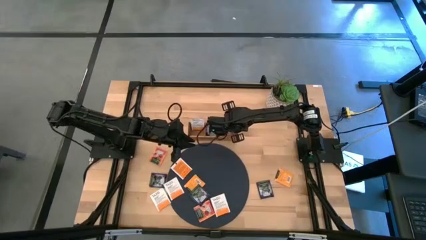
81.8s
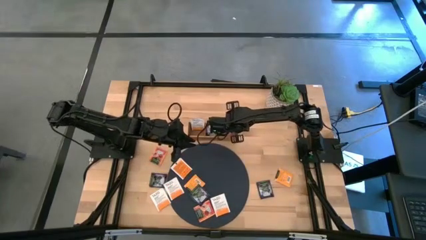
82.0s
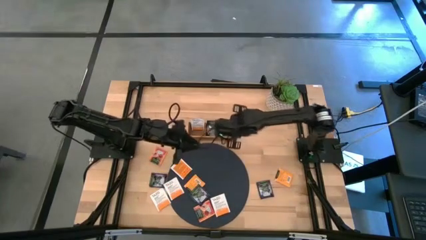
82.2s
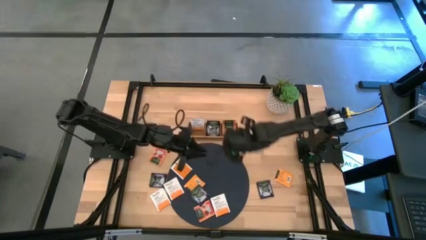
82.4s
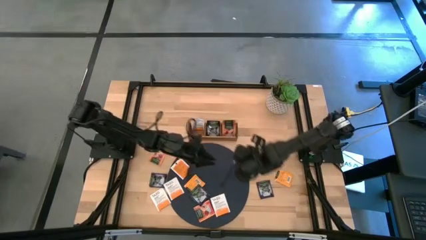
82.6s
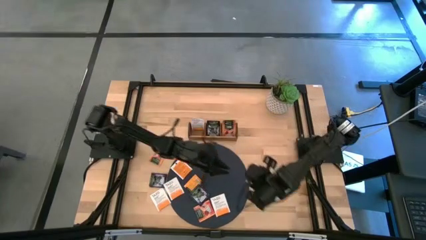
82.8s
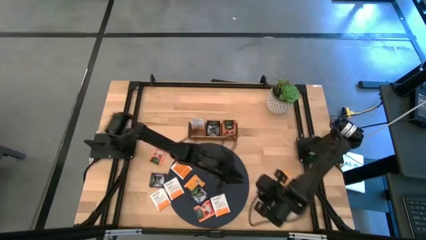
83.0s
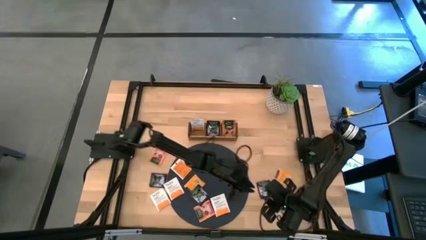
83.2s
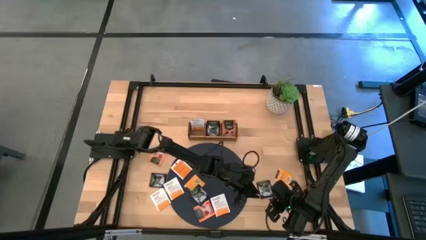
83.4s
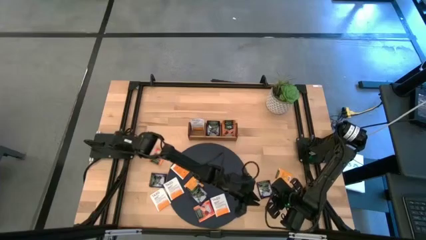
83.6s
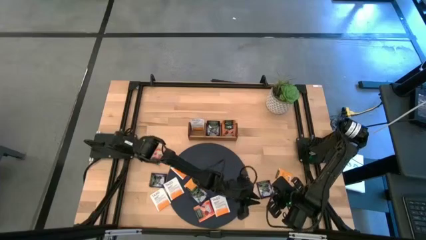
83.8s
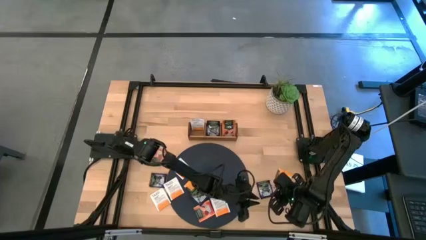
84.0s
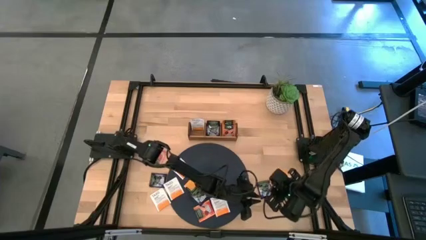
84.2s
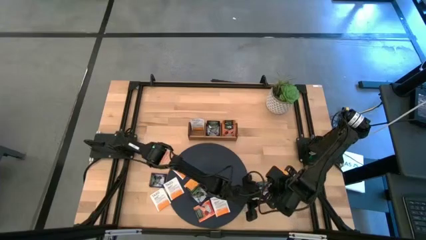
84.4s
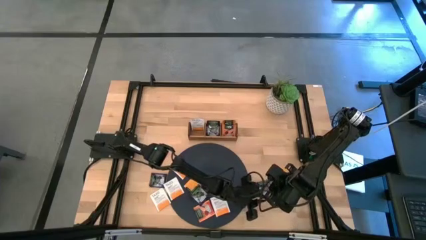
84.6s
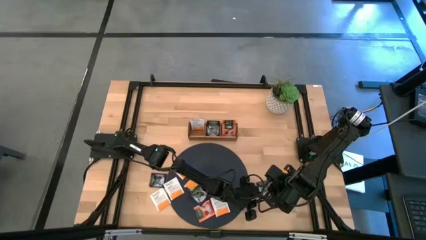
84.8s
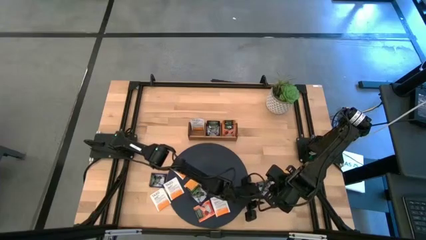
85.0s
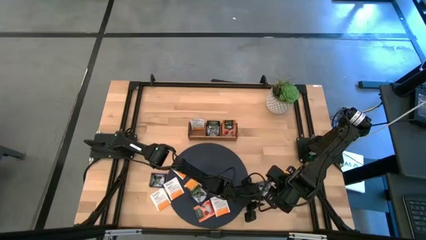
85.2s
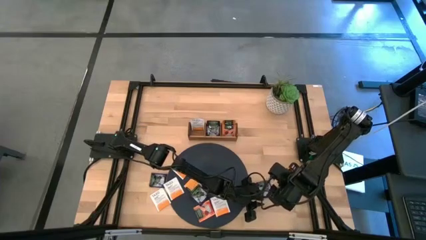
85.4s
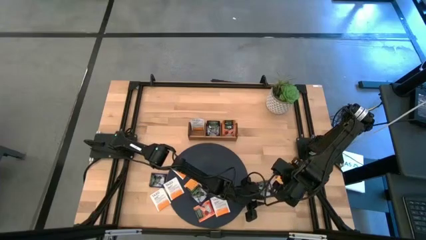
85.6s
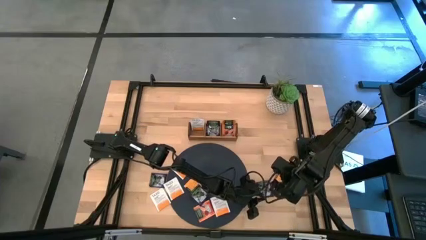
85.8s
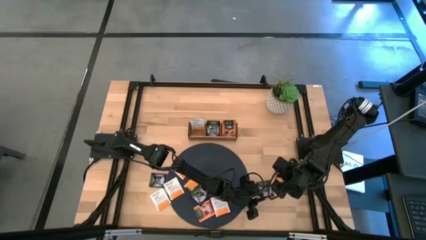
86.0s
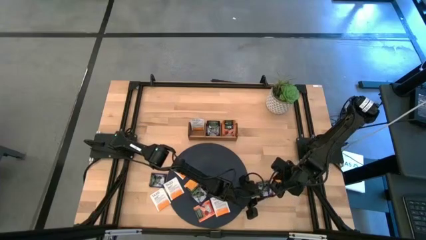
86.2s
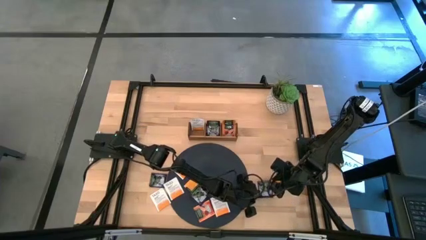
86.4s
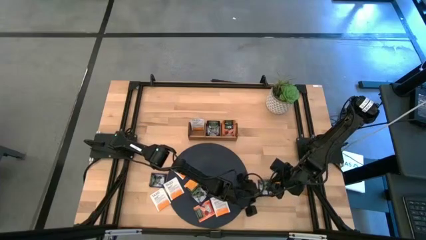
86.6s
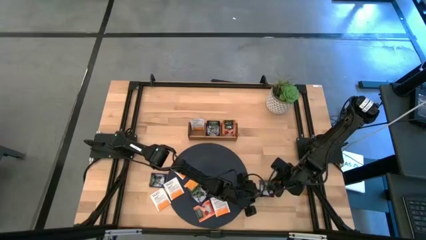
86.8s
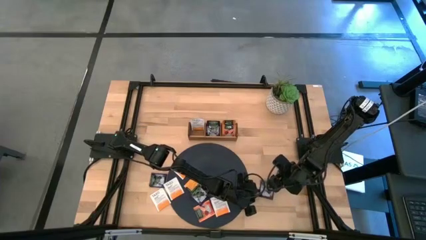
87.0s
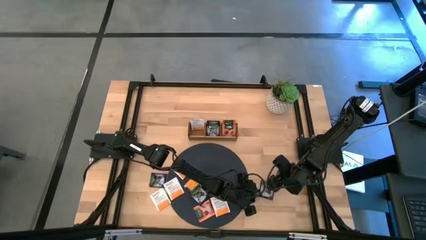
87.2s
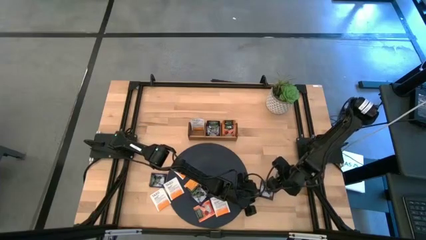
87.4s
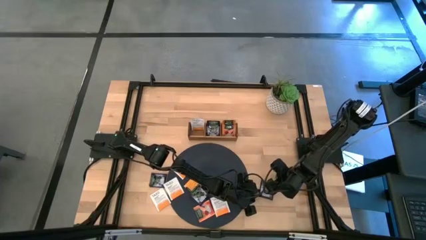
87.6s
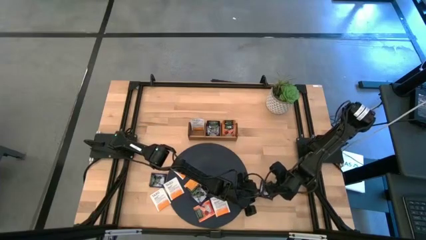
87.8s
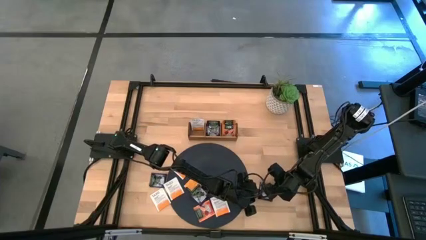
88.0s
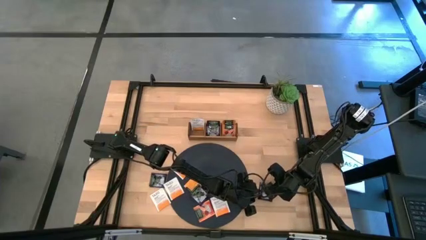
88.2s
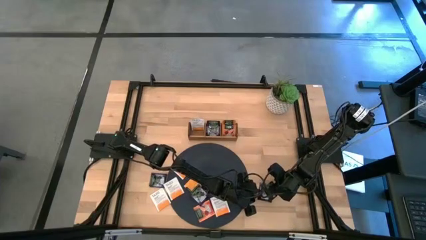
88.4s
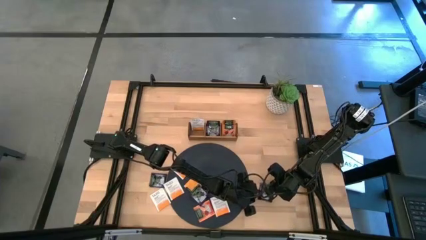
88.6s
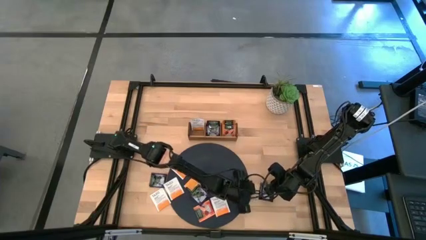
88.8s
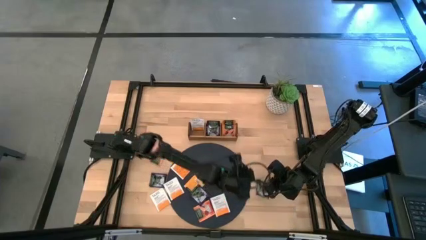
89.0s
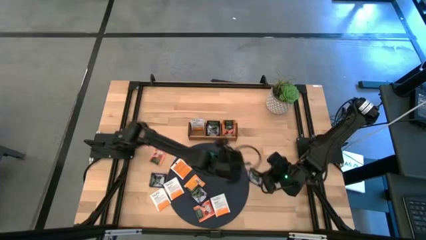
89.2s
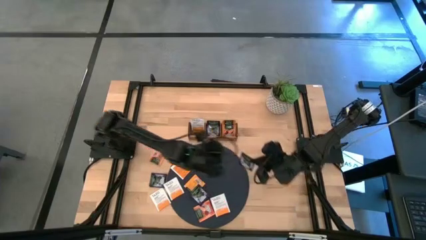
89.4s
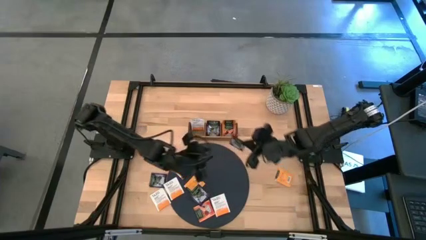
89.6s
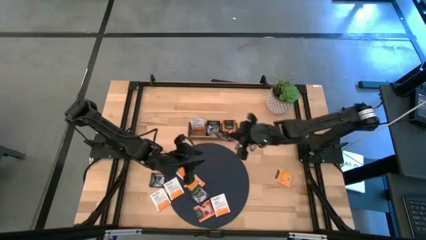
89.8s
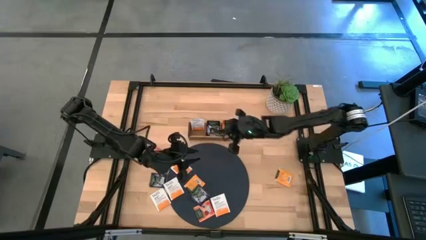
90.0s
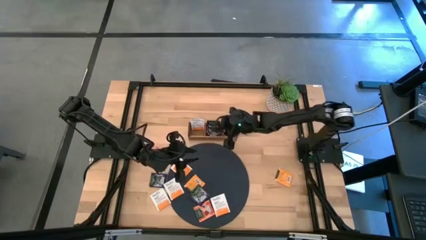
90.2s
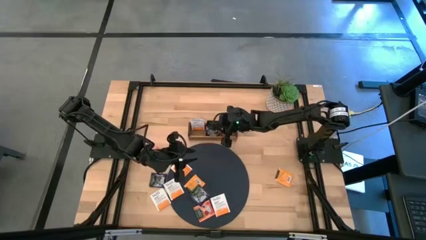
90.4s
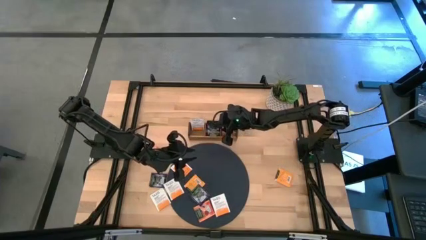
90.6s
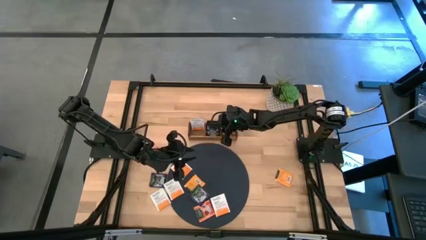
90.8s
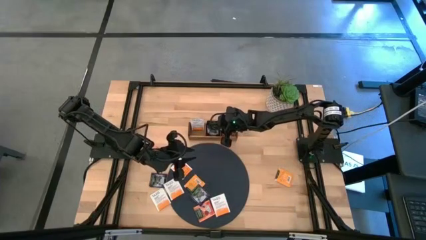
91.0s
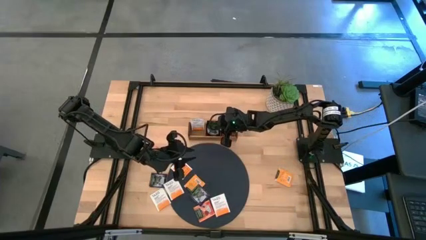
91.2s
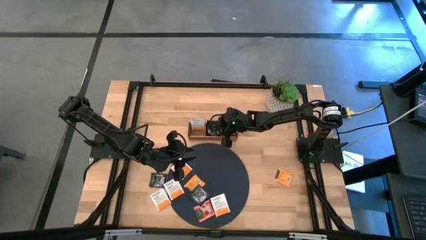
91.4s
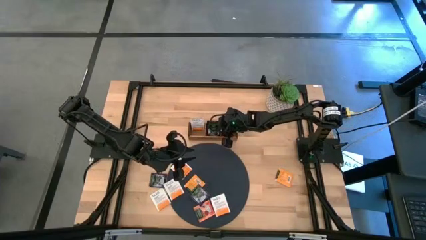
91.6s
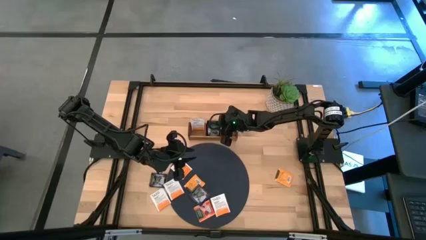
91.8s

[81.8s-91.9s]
Task: Pick & Place Tea
Put the violet tea bag into the middle of the wooden organizer

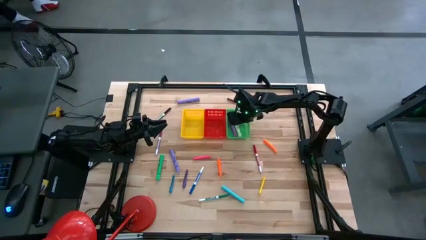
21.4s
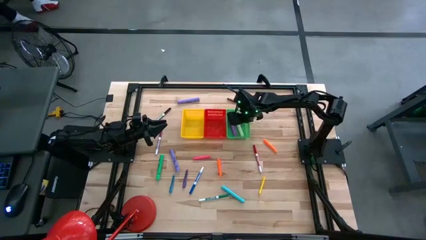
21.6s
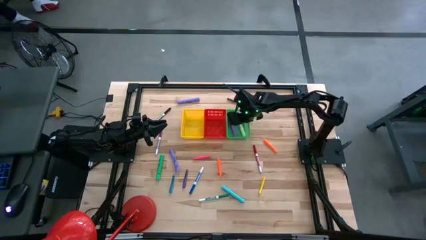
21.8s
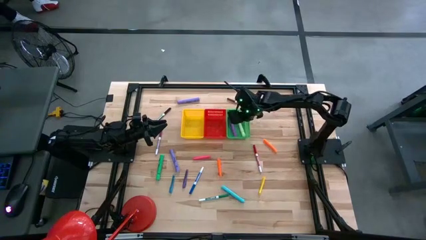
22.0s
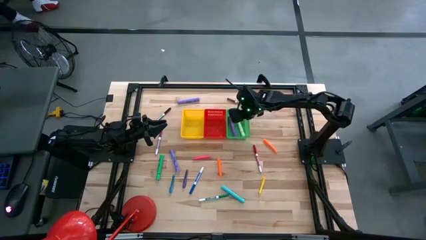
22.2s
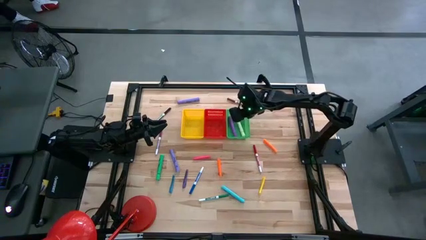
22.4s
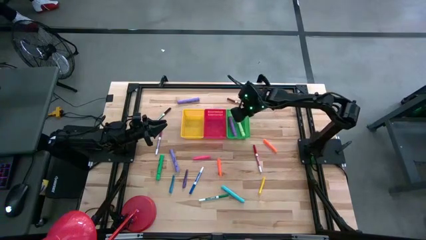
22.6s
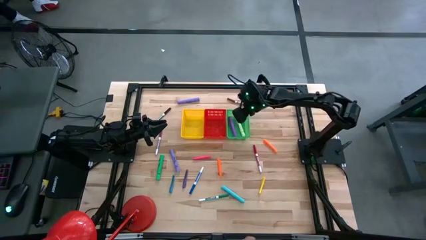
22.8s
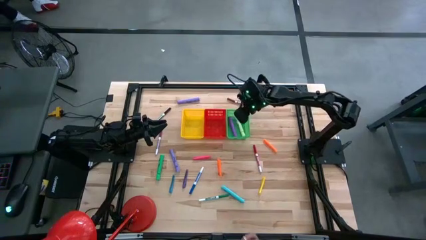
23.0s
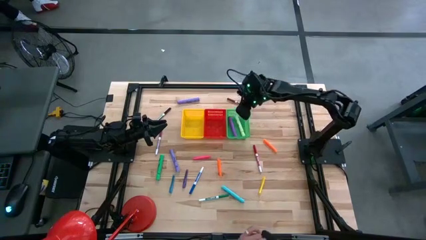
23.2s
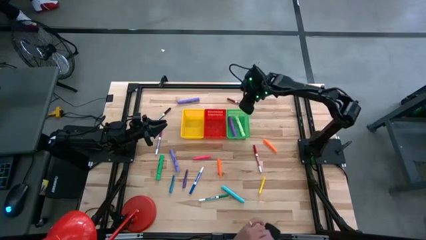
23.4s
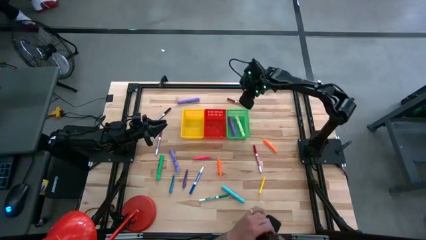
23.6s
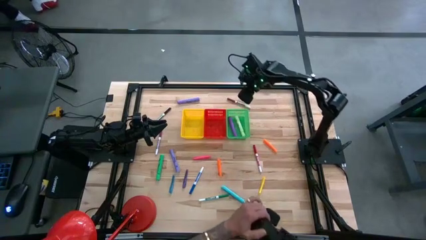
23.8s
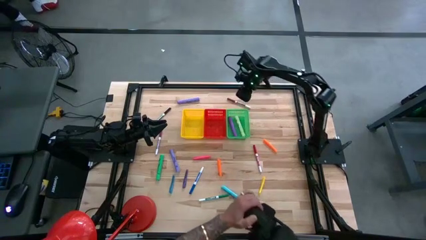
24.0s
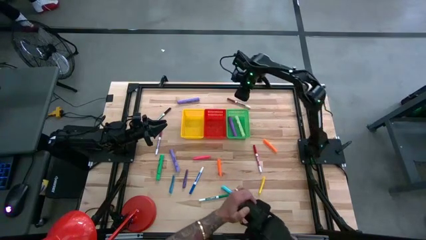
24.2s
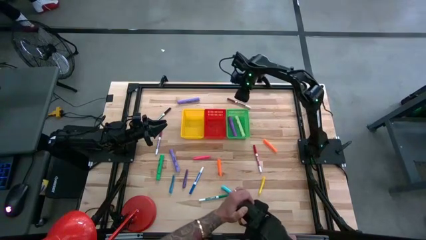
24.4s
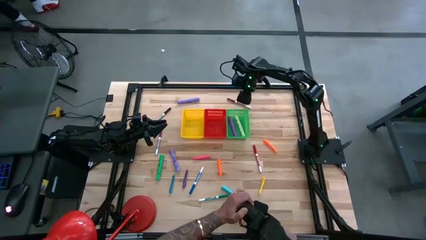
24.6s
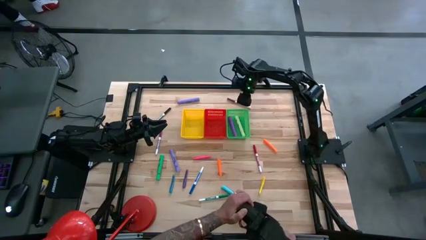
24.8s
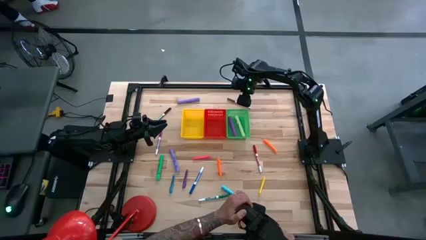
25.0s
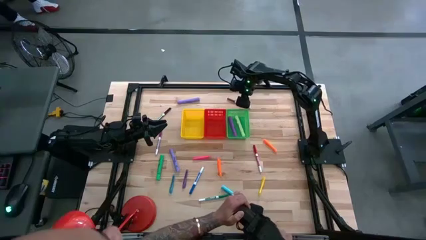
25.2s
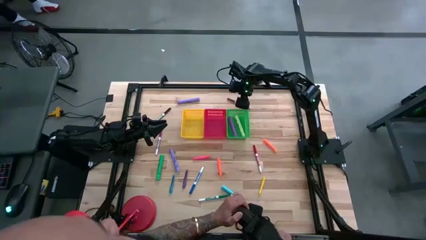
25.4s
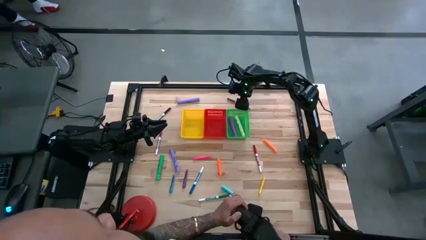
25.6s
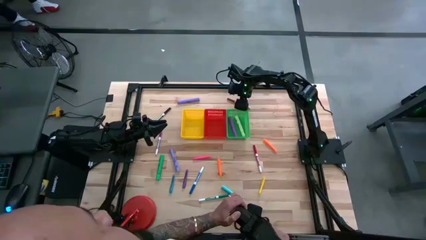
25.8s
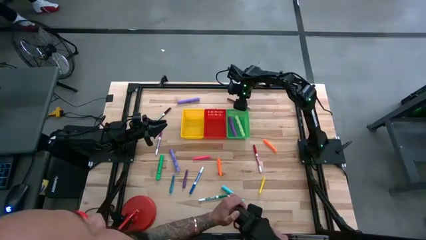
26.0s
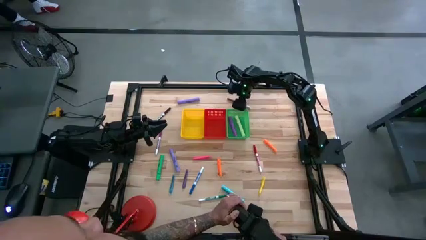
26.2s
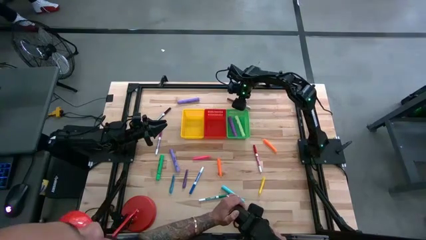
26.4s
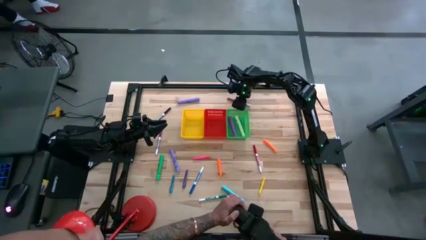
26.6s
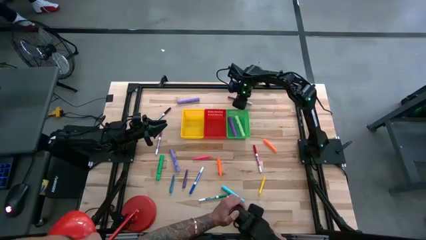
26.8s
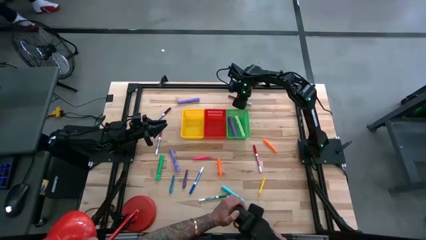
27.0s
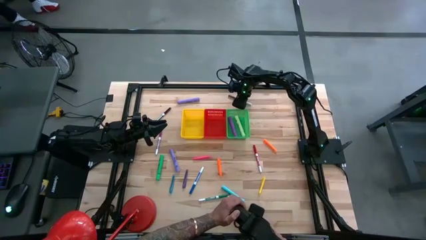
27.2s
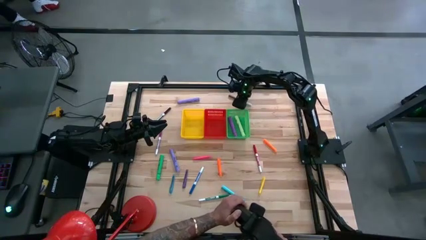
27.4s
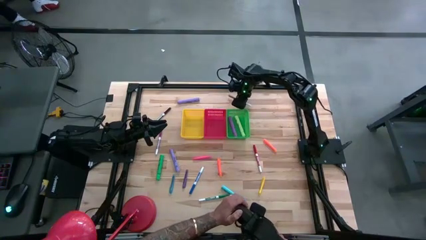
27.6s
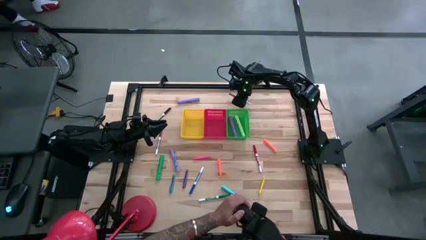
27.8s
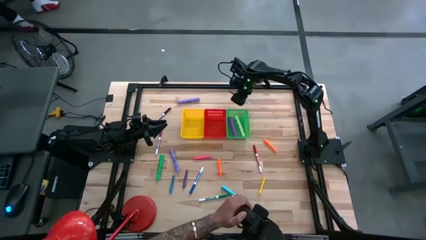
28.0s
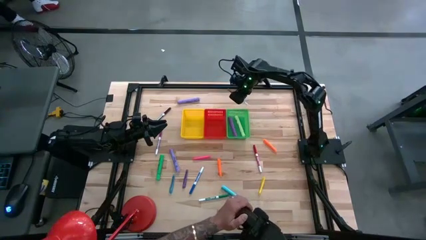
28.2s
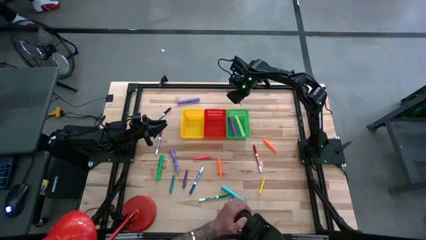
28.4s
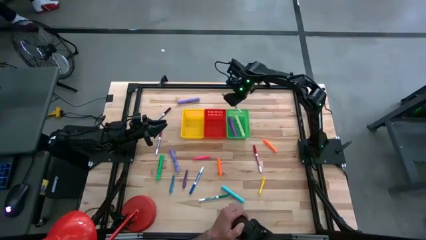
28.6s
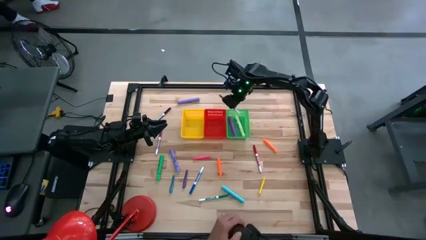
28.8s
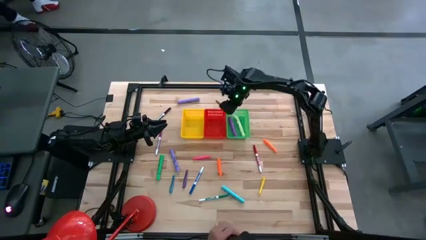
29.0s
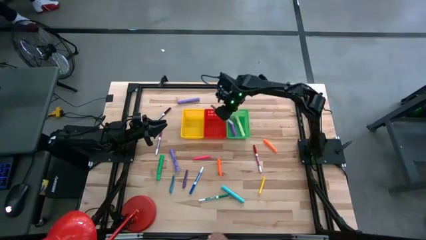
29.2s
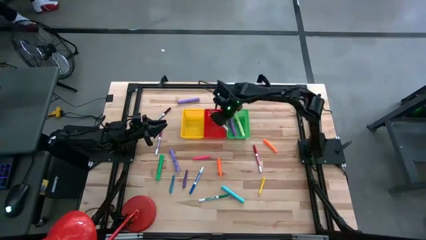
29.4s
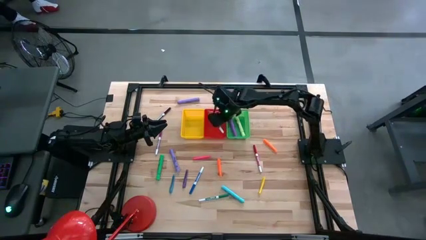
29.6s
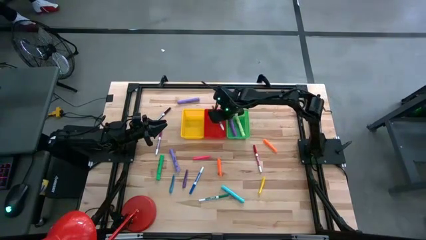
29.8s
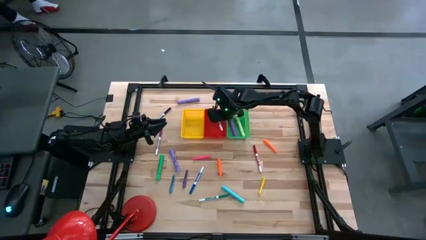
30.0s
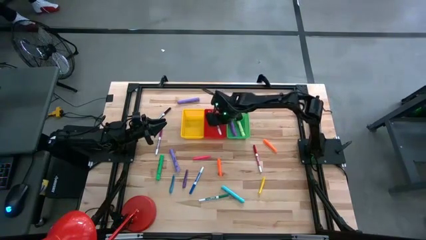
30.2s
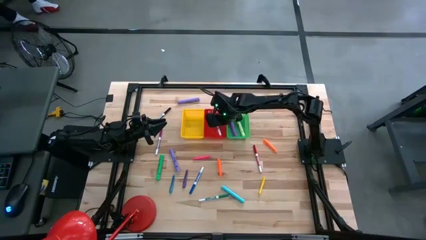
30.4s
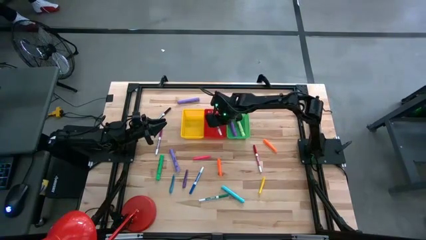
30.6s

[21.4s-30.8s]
Task: Pick & Place Markers
Put the brown marker into the red bin
